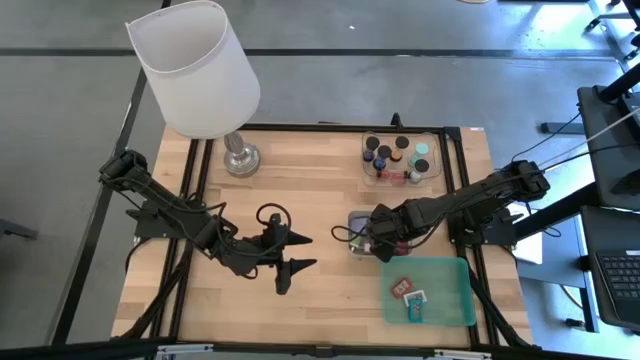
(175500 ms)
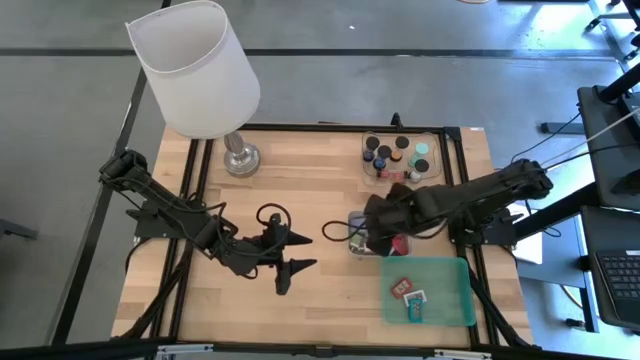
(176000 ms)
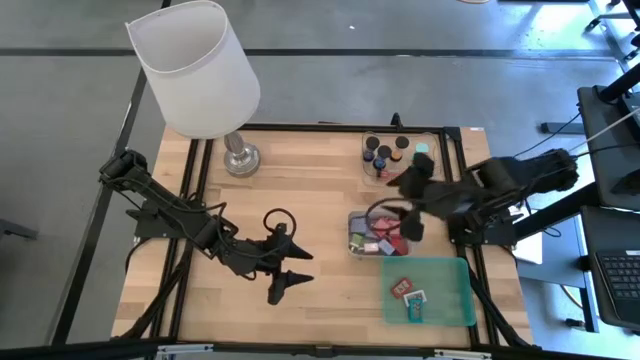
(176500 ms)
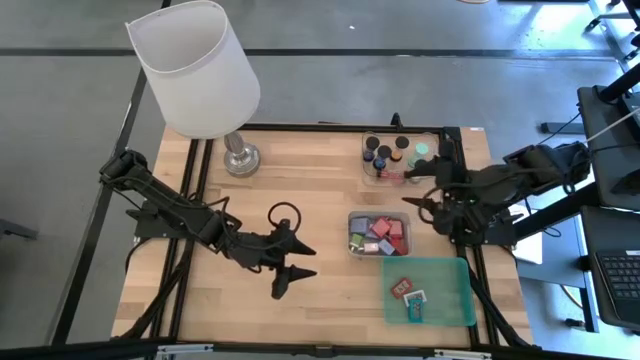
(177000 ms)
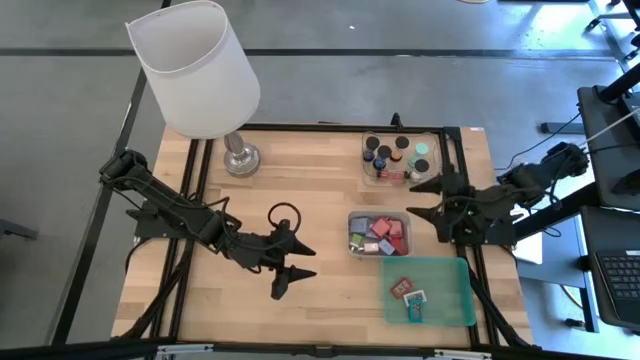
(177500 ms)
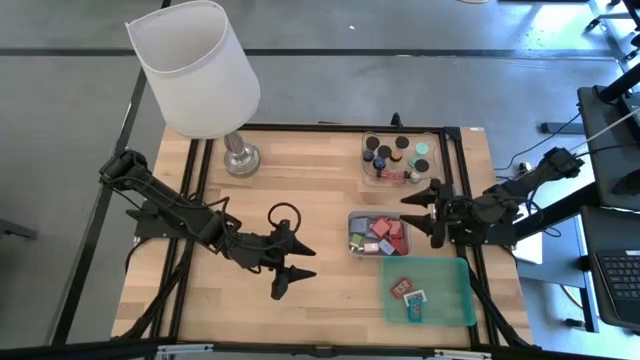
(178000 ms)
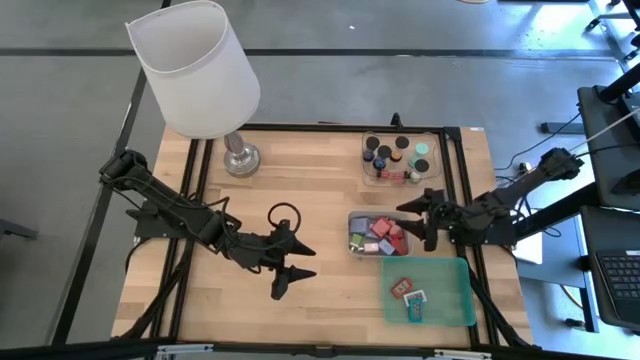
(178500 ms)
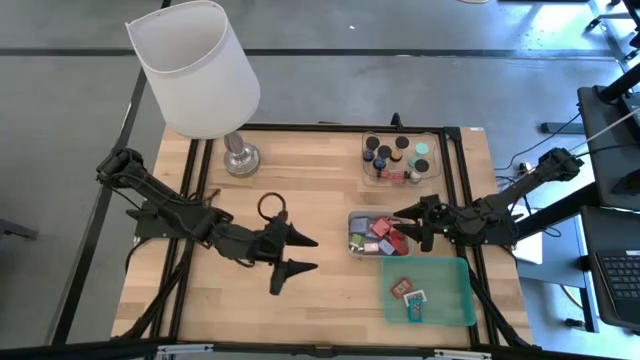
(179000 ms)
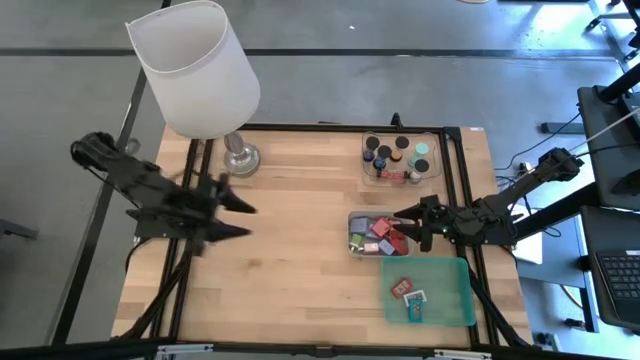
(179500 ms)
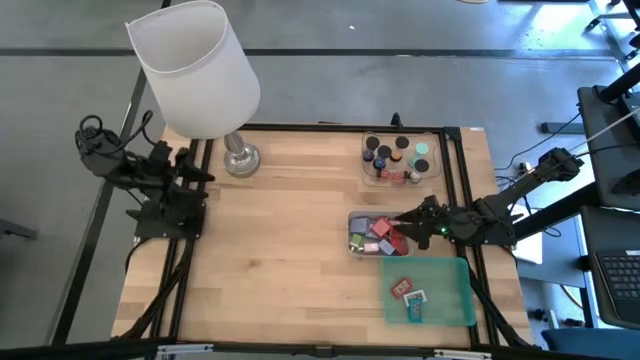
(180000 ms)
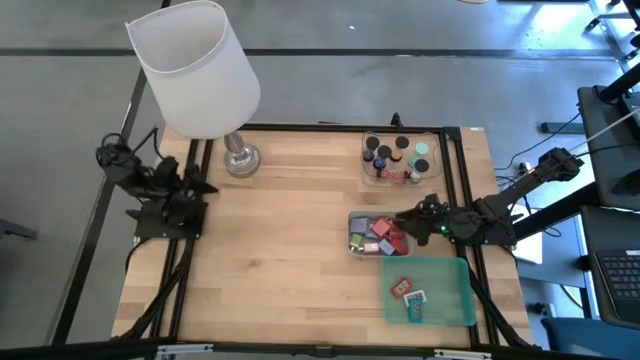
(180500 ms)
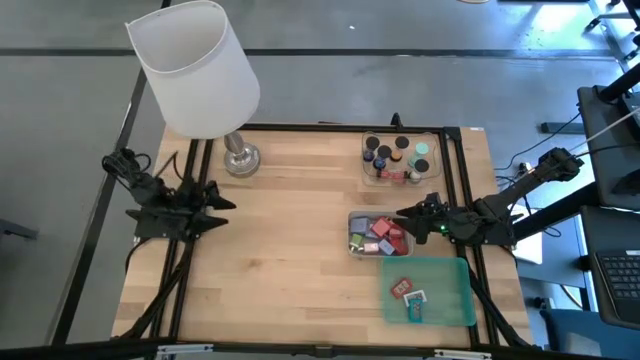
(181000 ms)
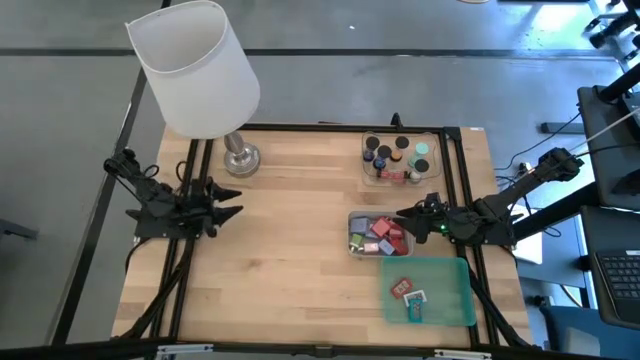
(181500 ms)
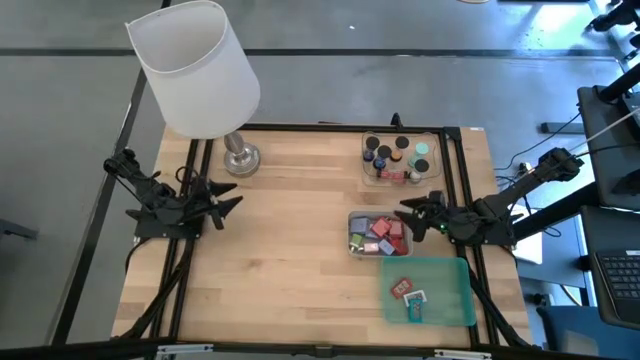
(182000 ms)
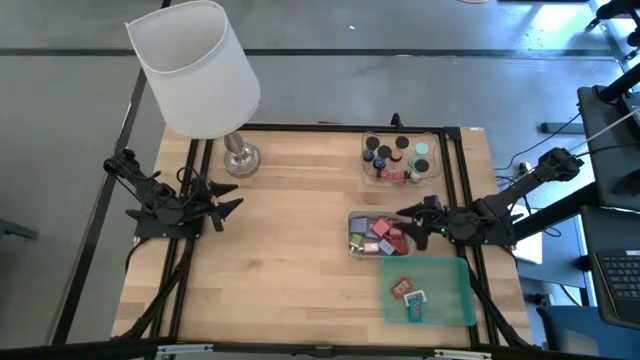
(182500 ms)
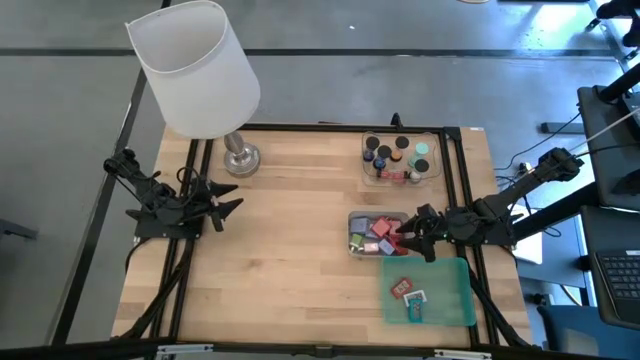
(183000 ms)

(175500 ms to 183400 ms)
Task: Pick & Place Office items
Return to Home Position

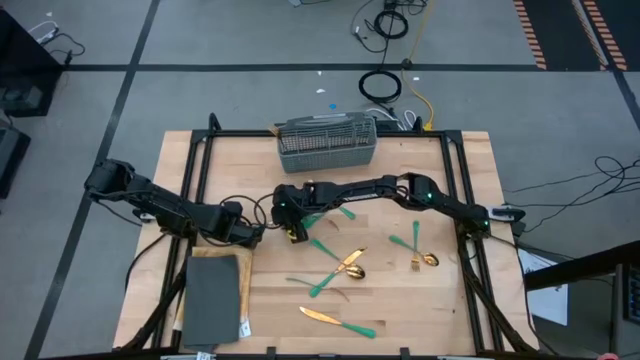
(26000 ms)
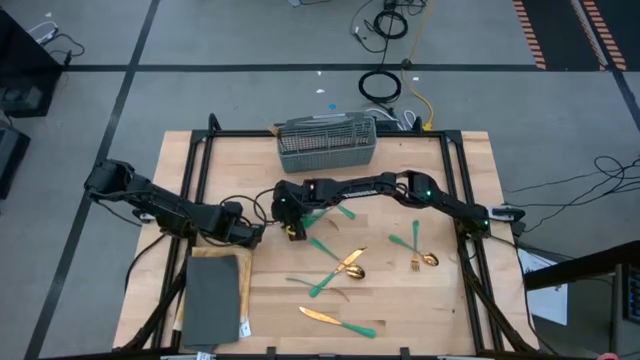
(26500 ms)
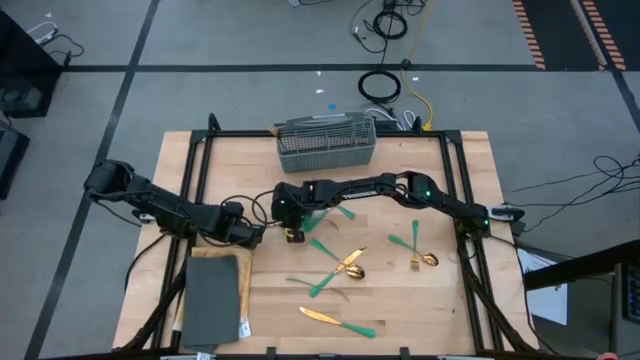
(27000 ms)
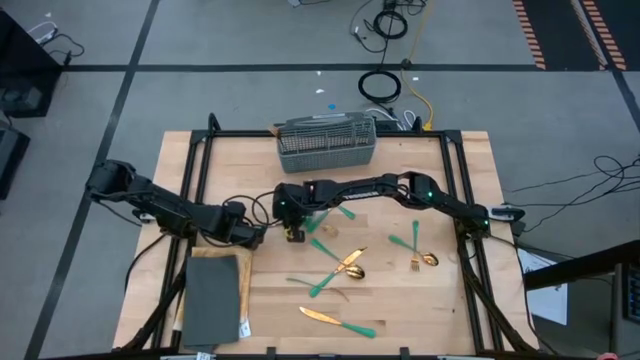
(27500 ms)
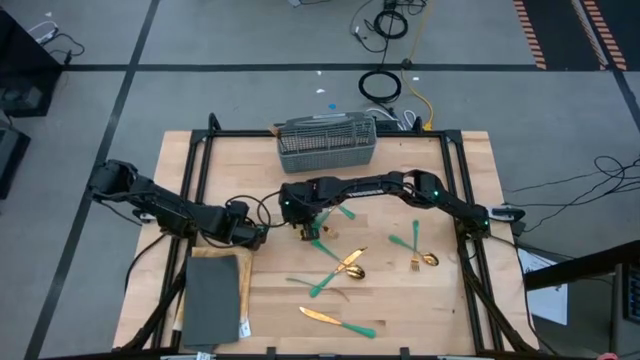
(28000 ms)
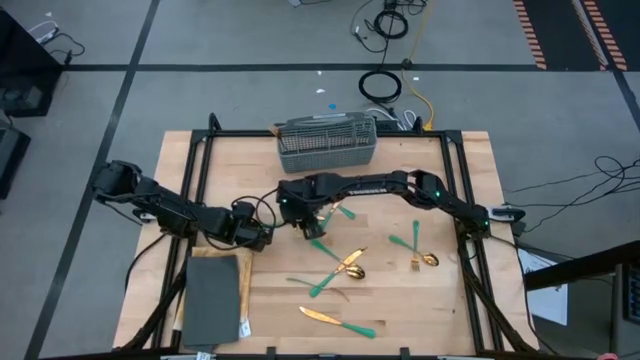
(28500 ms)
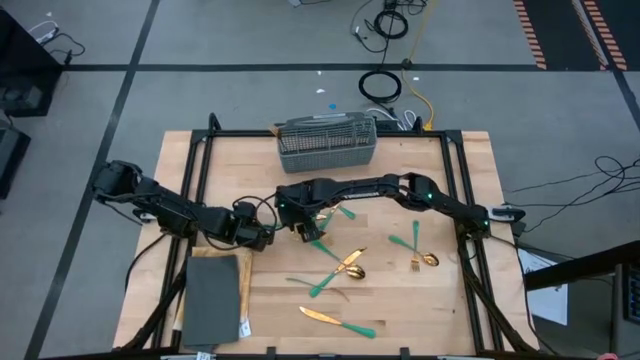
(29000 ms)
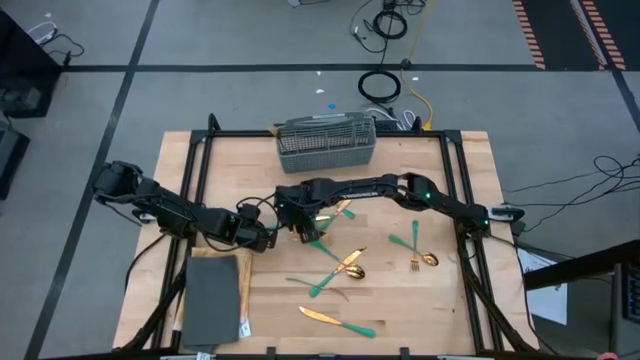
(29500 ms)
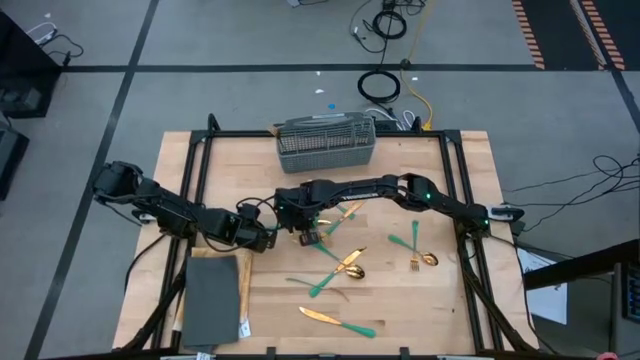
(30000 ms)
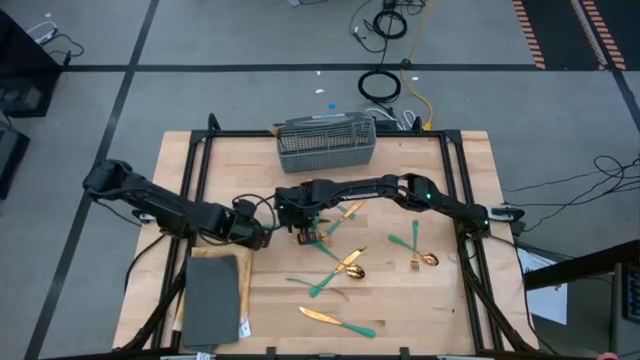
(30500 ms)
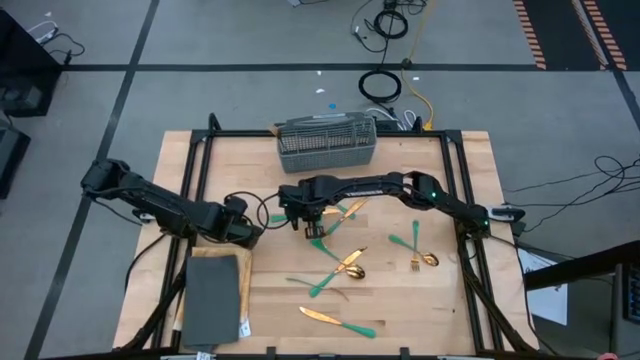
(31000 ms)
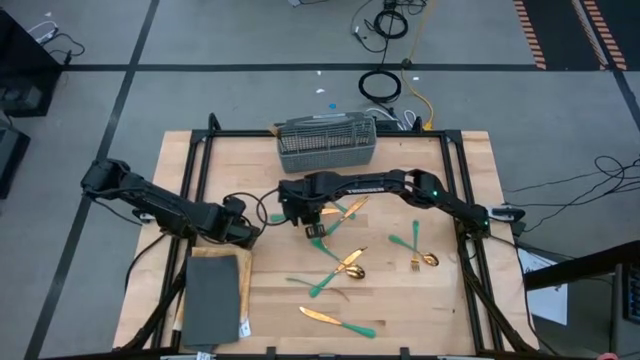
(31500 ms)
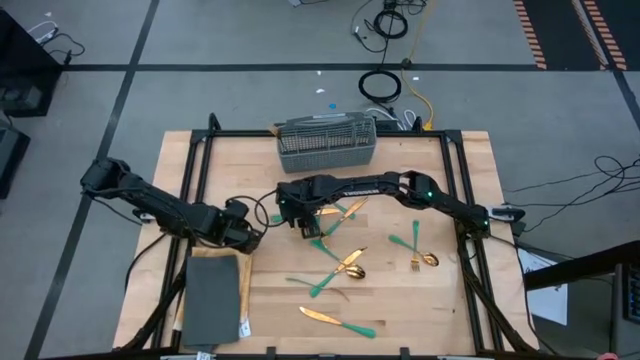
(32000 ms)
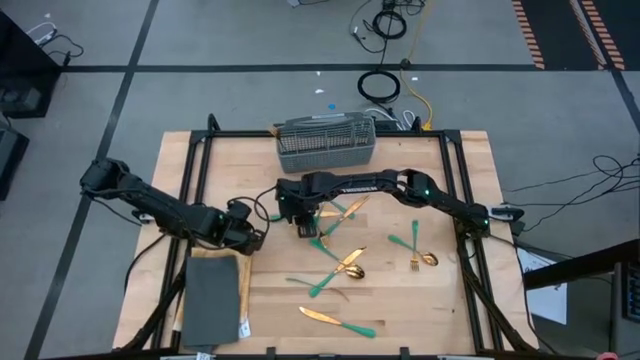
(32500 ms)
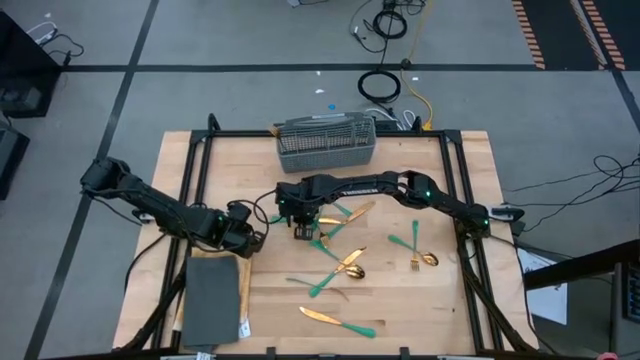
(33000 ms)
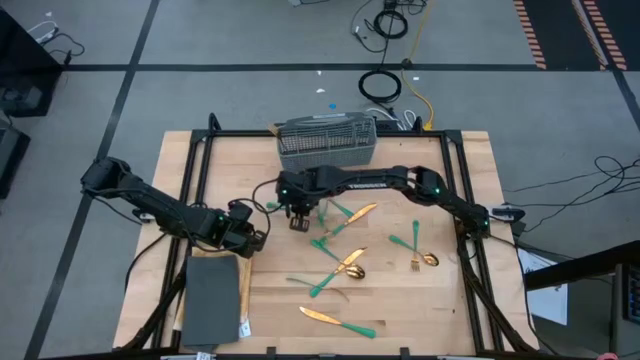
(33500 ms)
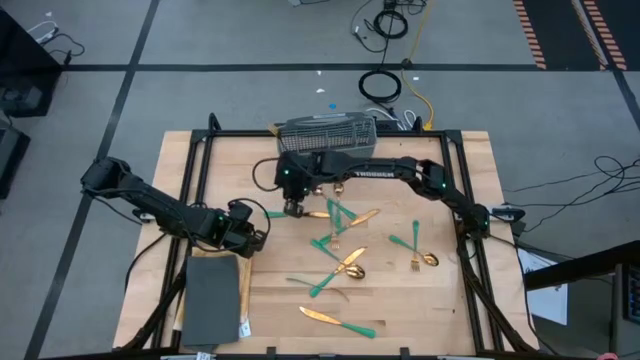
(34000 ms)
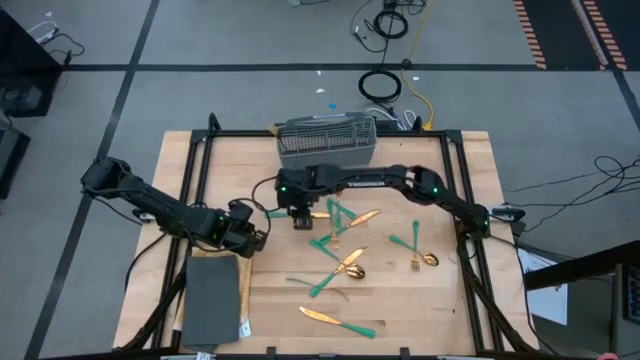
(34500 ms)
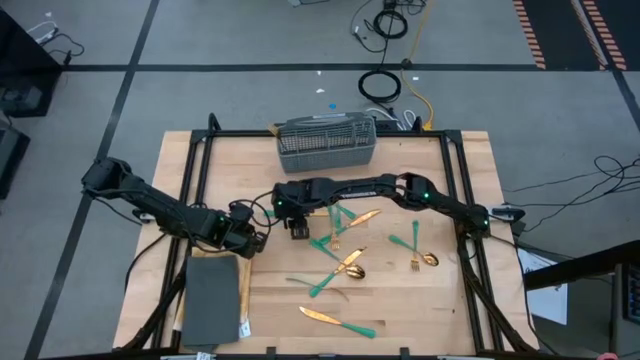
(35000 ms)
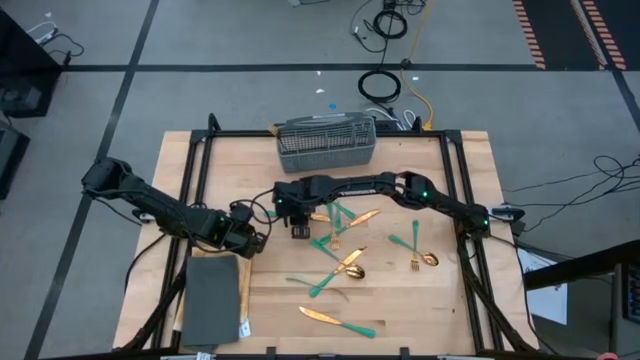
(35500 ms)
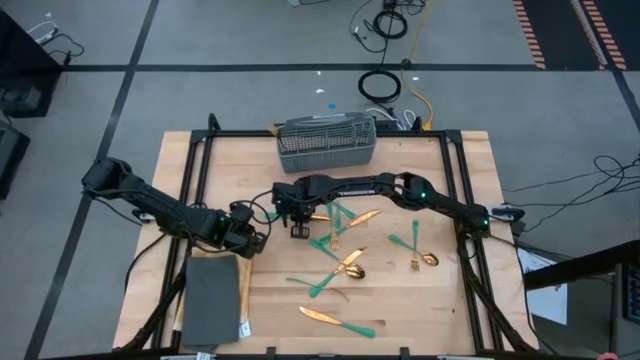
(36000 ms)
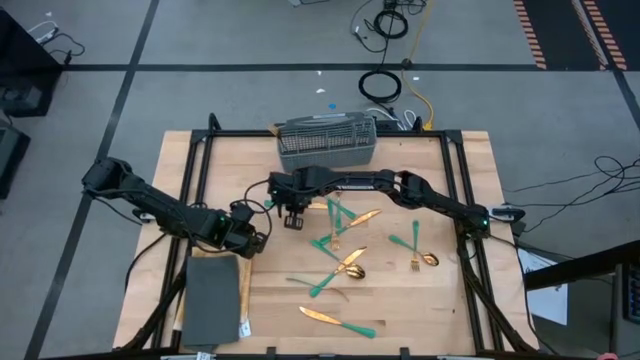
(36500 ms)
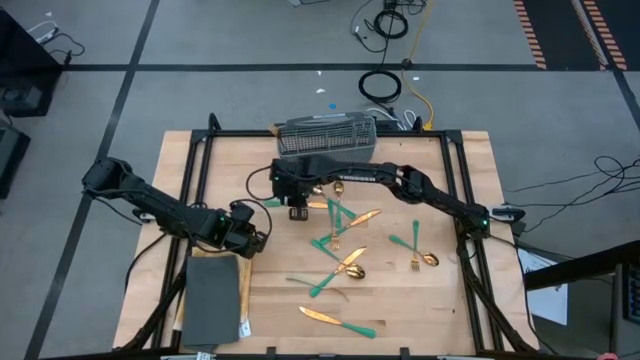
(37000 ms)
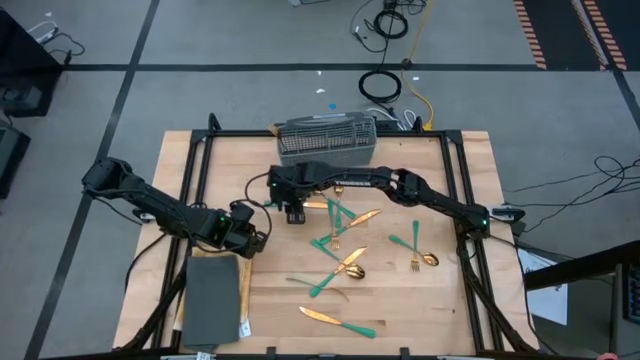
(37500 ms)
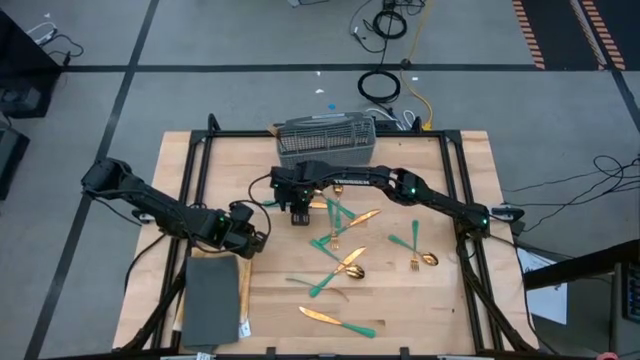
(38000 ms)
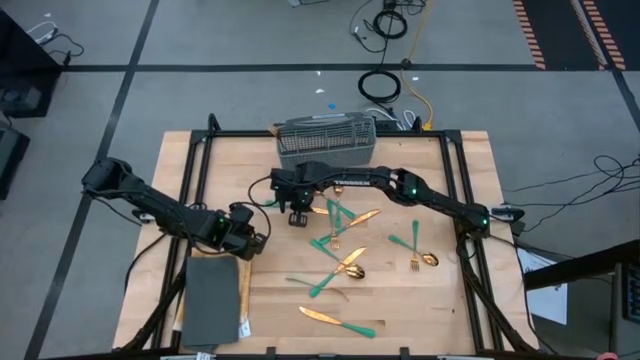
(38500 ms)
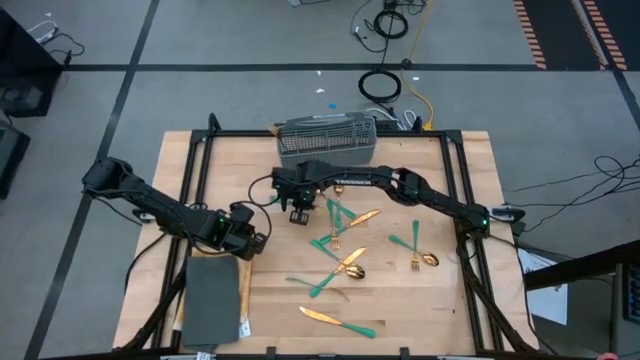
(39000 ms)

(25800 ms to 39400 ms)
Task: Sort silverware
Put the green knife into the silverware basket
